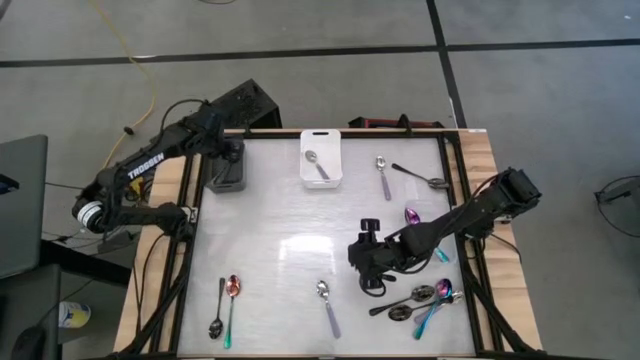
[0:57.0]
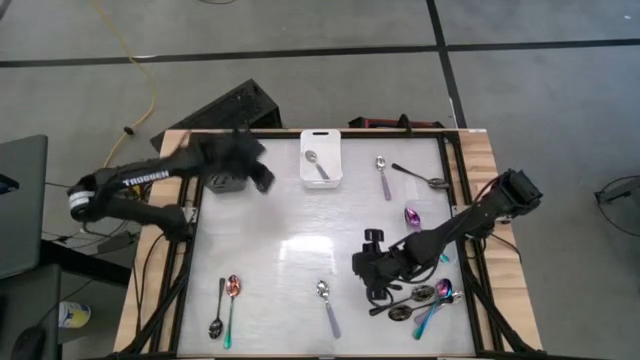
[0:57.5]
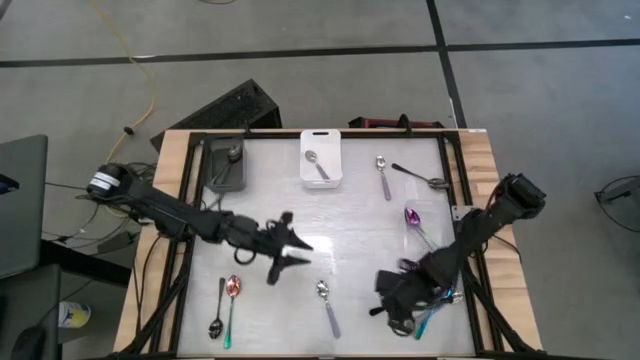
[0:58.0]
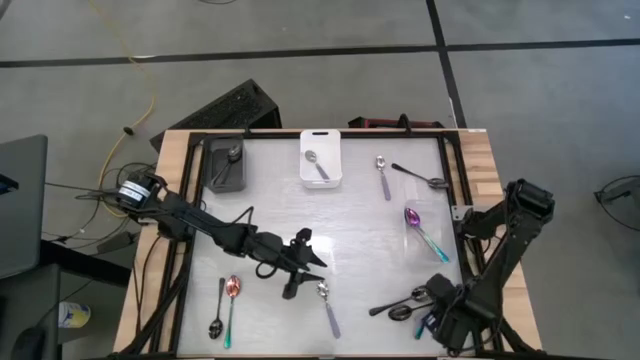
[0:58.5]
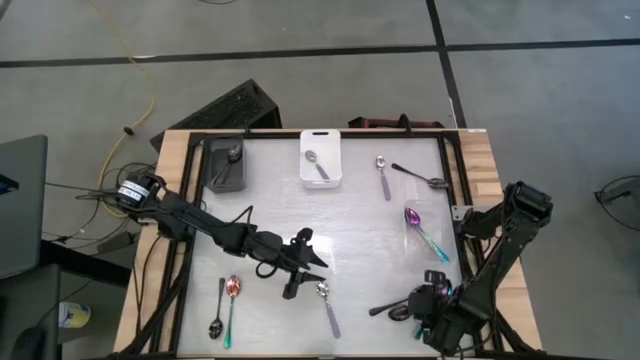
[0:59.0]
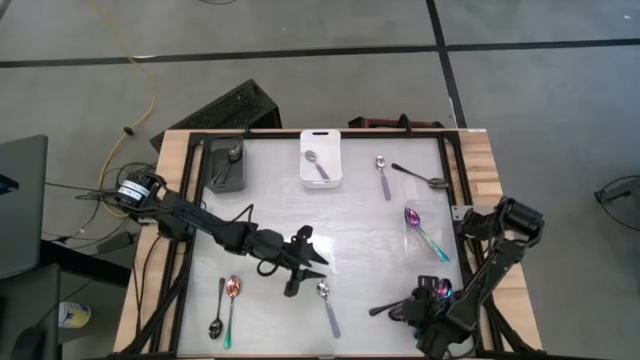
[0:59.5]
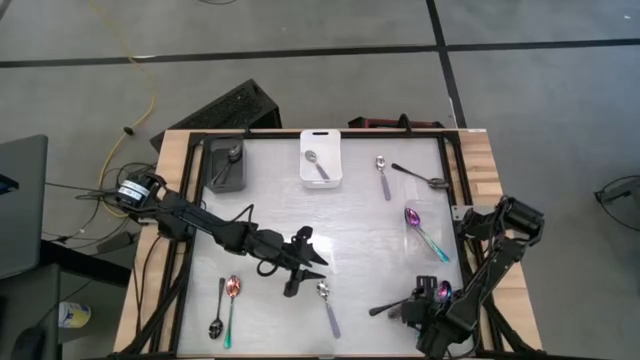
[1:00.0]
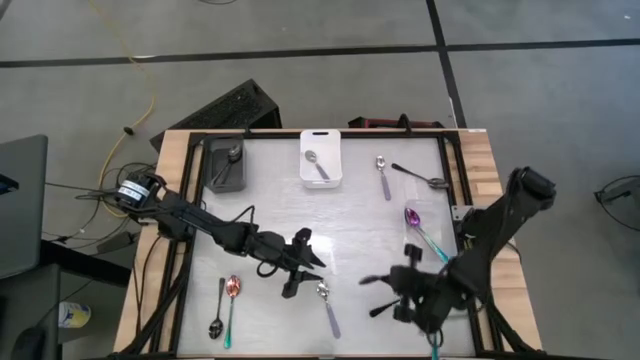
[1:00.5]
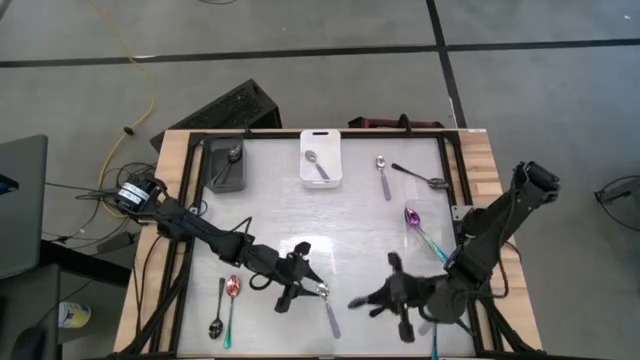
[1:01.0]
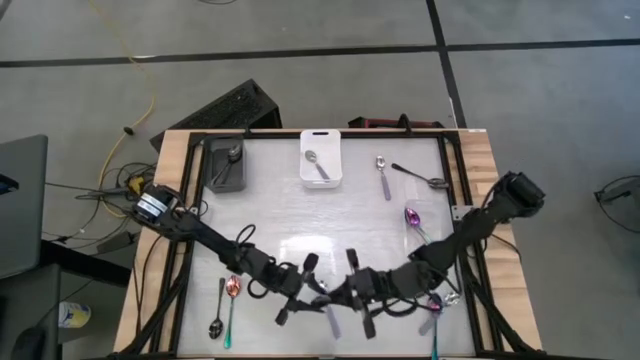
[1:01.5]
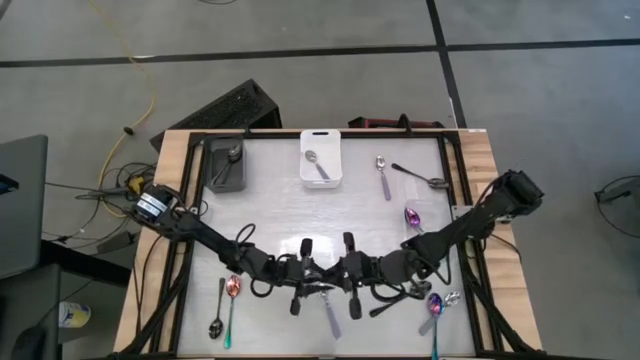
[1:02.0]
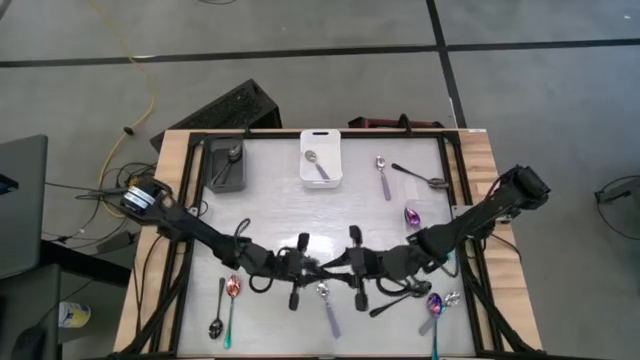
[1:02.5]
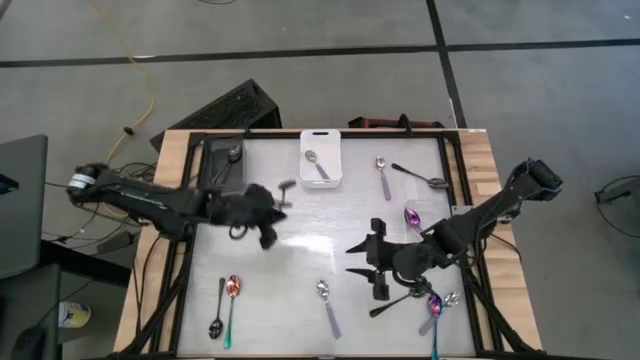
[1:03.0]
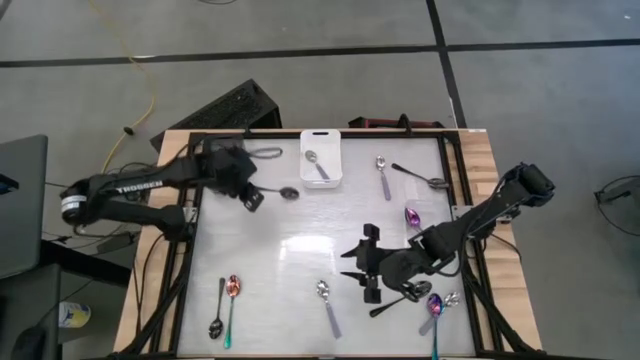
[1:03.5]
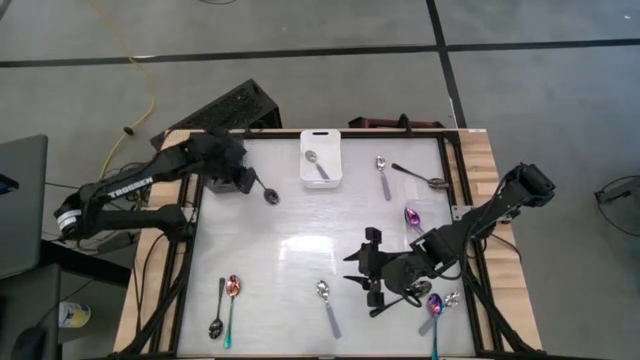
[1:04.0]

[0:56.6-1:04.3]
Task: Sort silverware by color (type)
Put the black spoon into the black bin

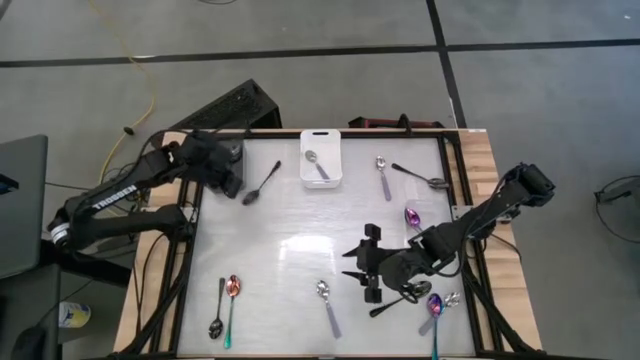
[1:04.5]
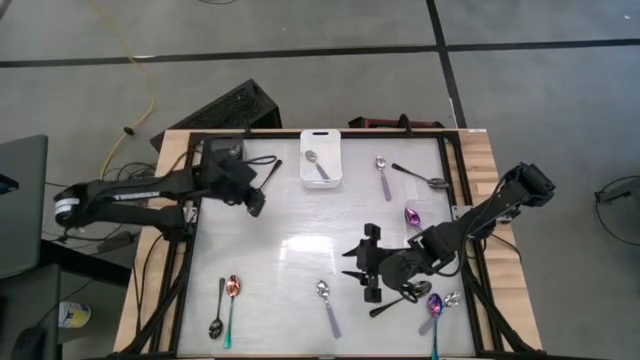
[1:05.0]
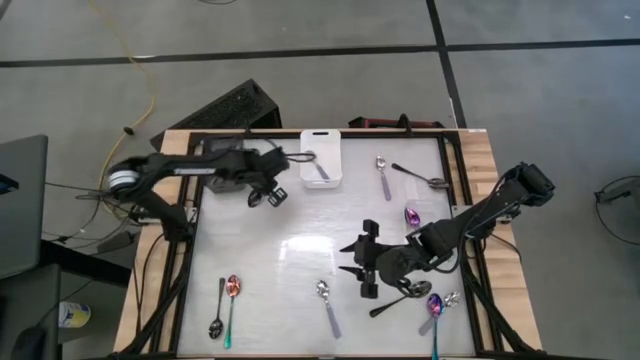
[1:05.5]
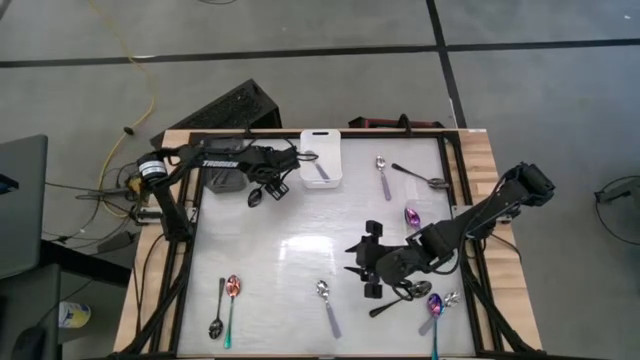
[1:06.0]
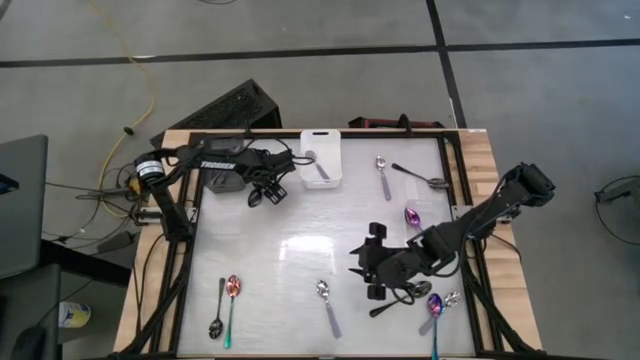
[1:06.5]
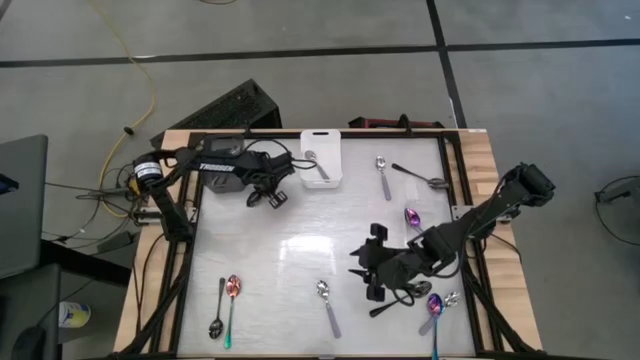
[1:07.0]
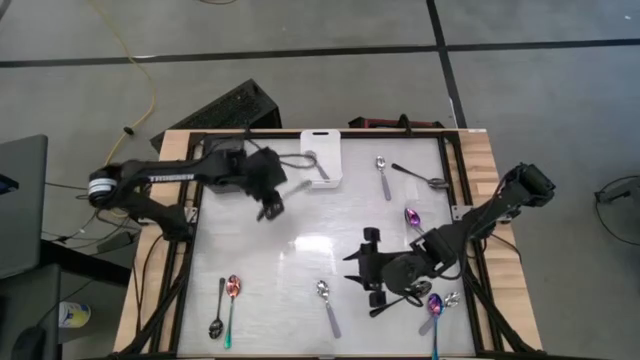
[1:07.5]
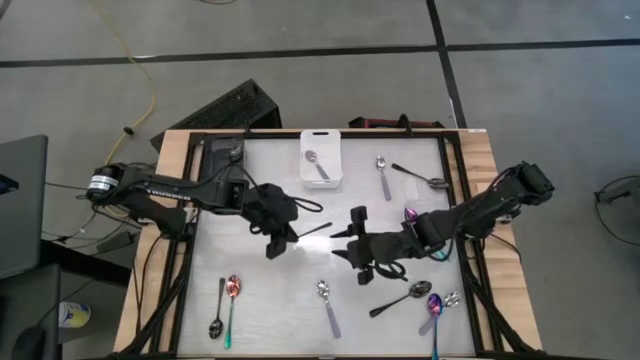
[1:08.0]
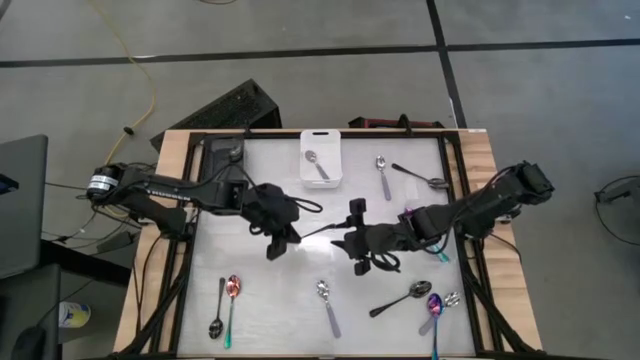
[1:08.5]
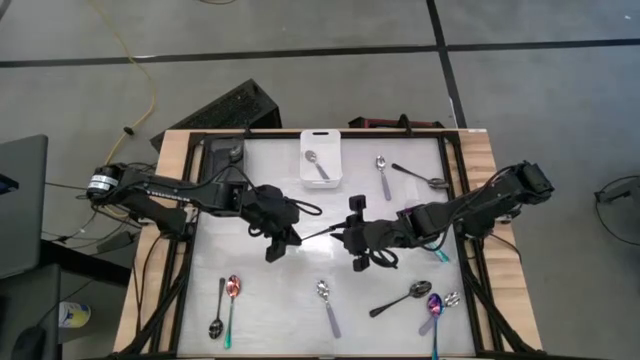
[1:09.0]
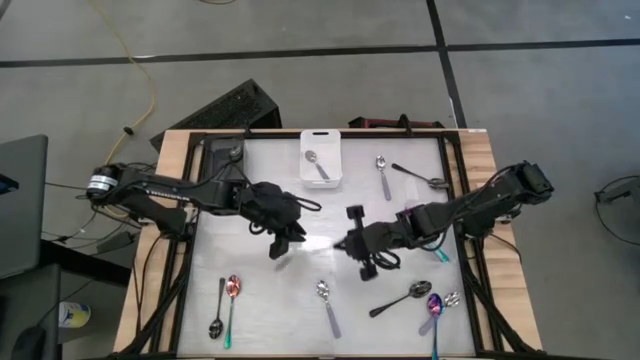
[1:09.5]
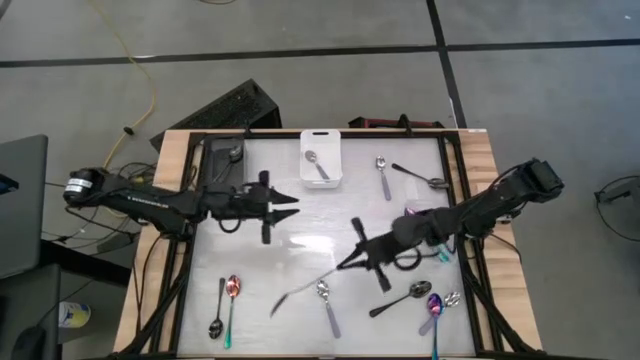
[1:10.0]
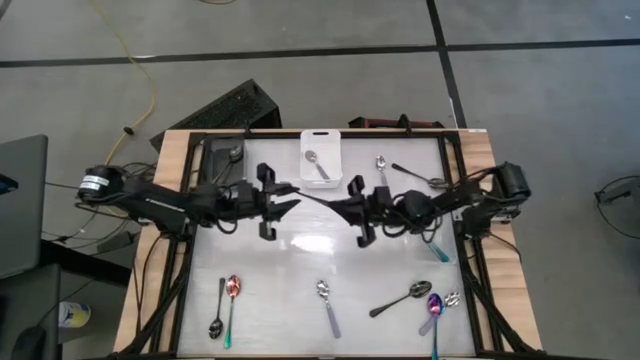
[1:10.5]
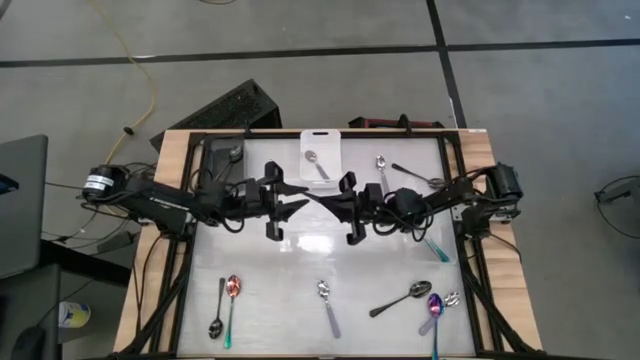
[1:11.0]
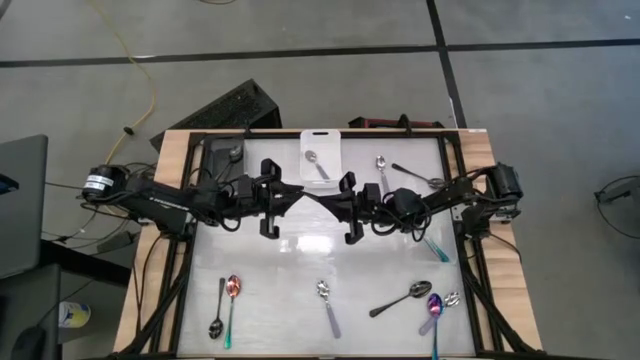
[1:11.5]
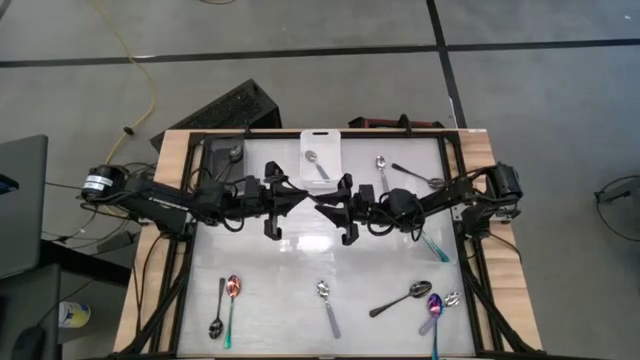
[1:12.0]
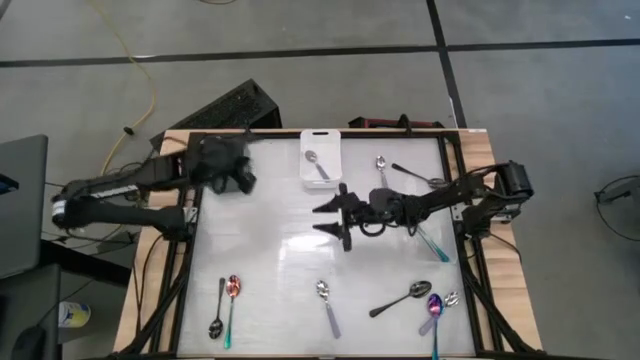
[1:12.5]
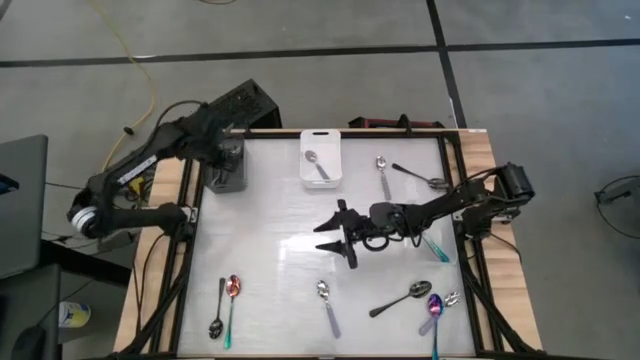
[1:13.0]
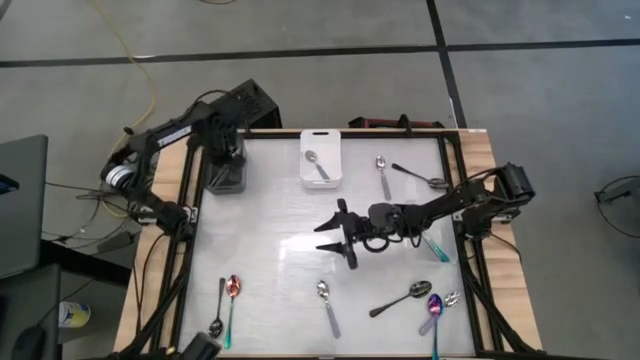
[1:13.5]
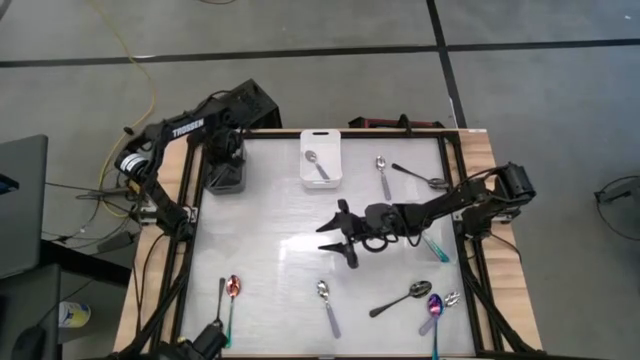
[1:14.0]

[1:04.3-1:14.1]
Put the black spoon into the black bin

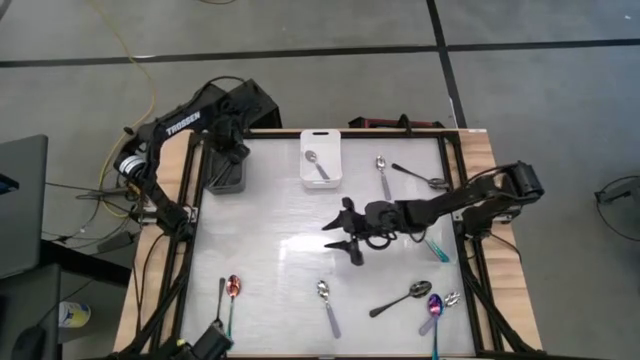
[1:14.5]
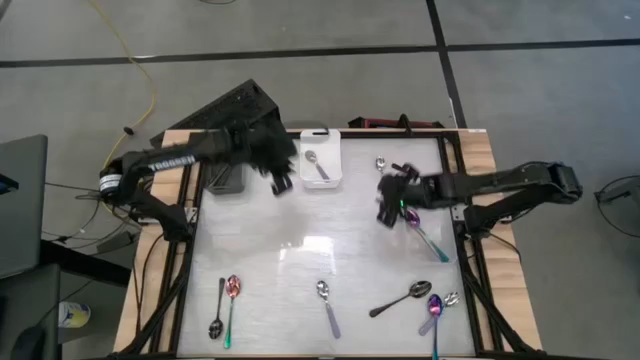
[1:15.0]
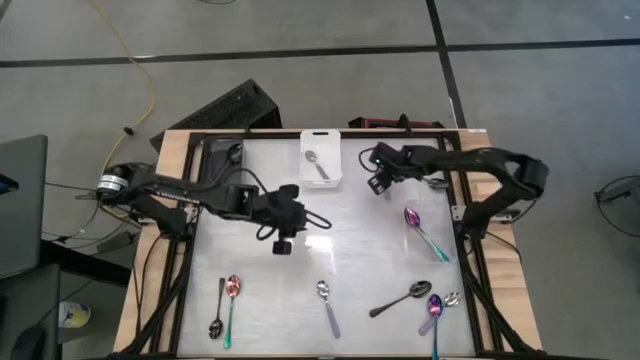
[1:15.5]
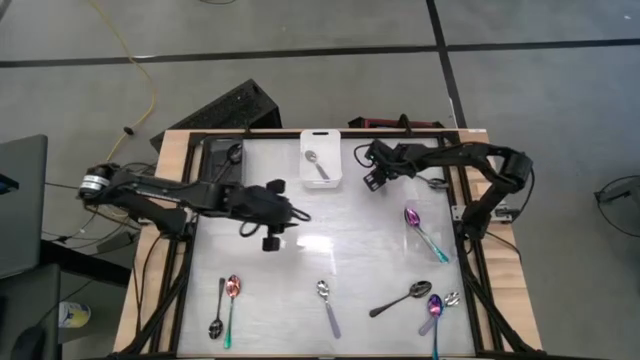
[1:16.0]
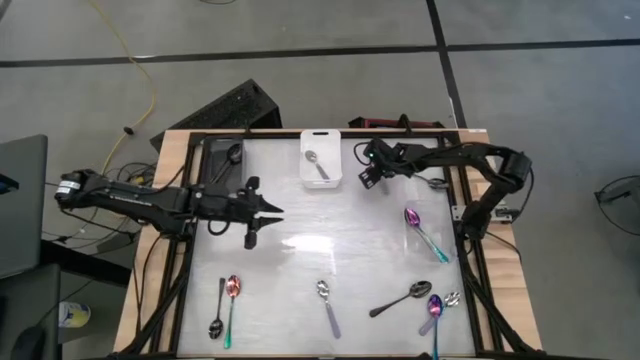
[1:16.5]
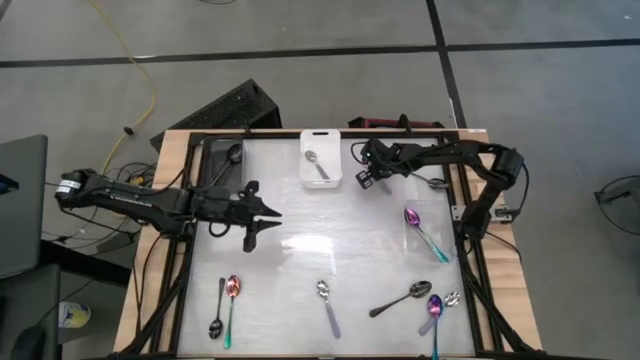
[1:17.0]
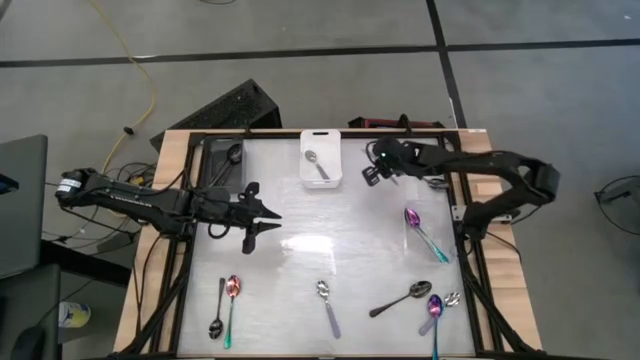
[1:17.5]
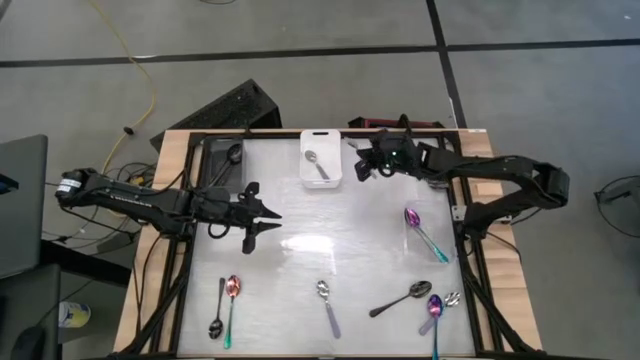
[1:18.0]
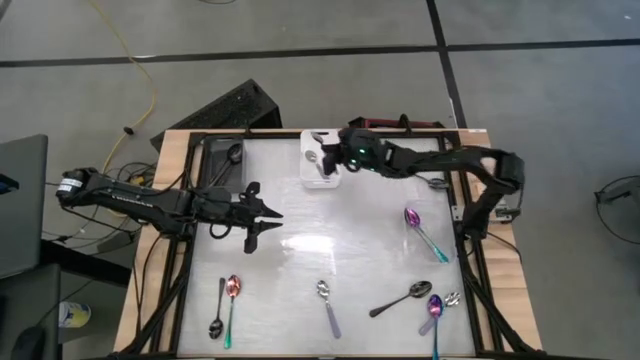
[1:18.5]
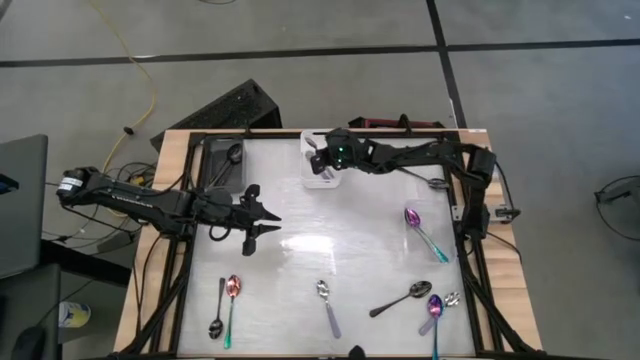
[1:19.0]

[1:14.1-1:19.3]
Put the purple spoon into the white bin
